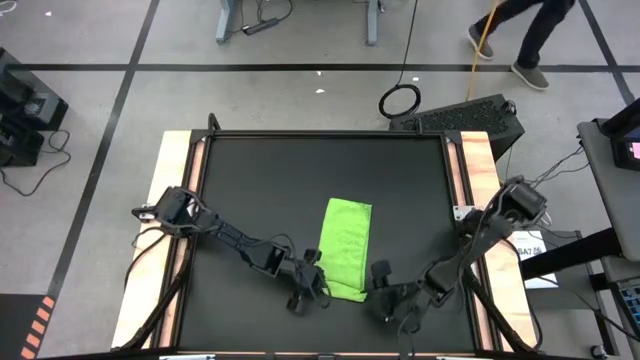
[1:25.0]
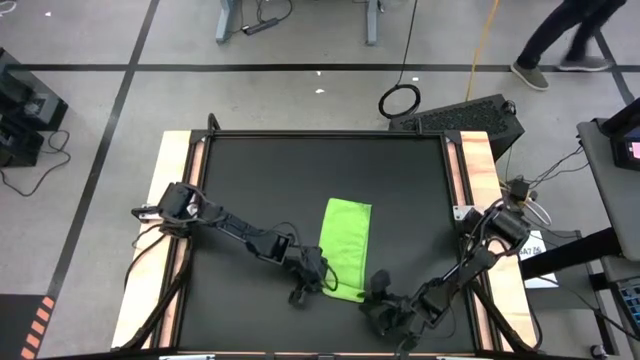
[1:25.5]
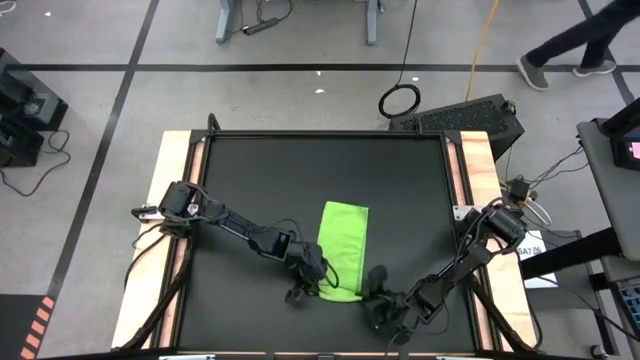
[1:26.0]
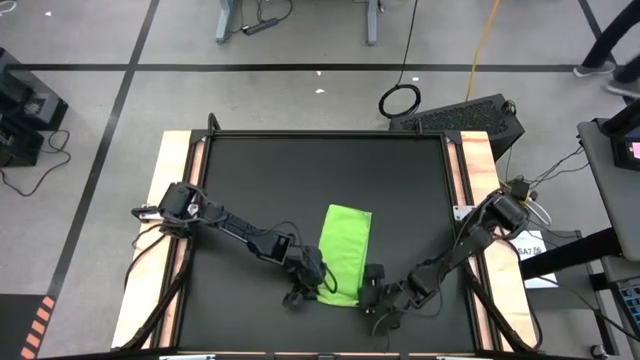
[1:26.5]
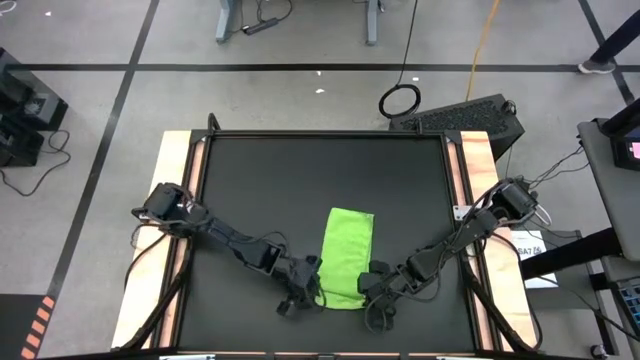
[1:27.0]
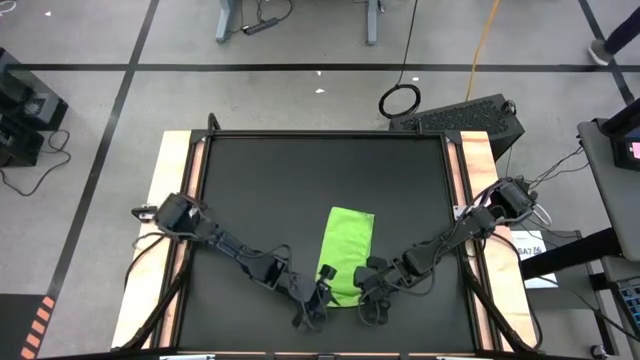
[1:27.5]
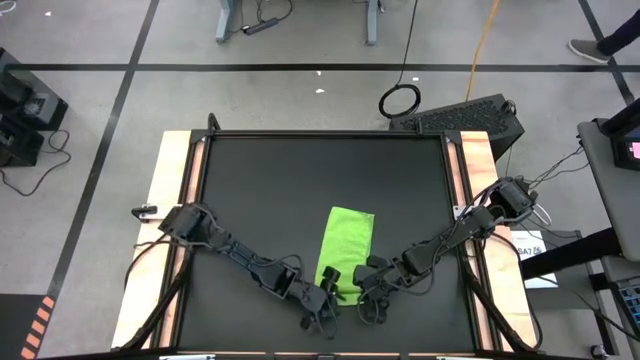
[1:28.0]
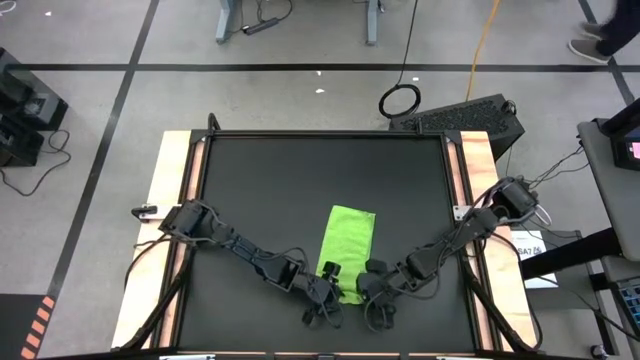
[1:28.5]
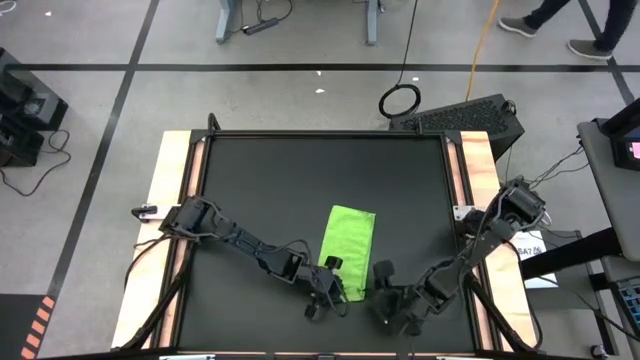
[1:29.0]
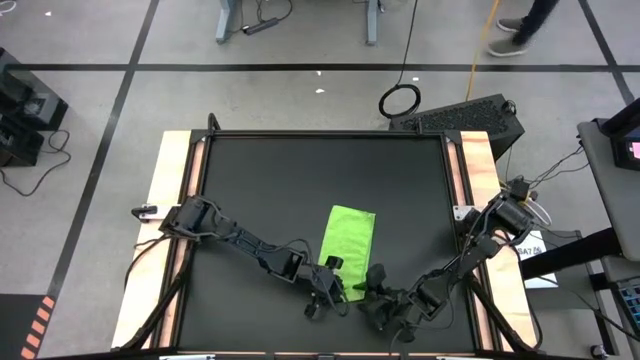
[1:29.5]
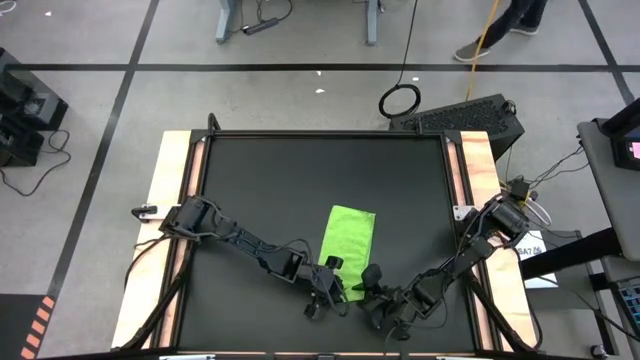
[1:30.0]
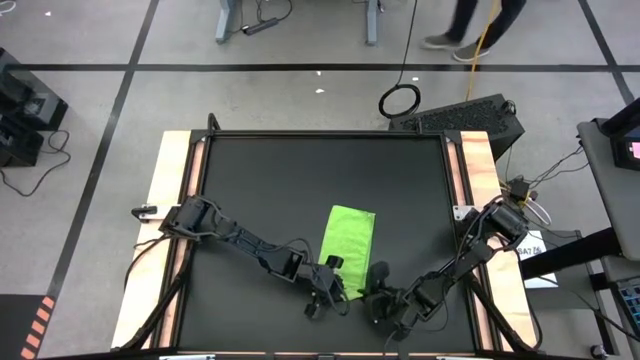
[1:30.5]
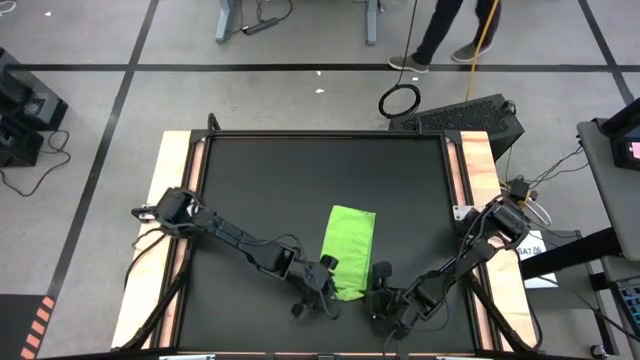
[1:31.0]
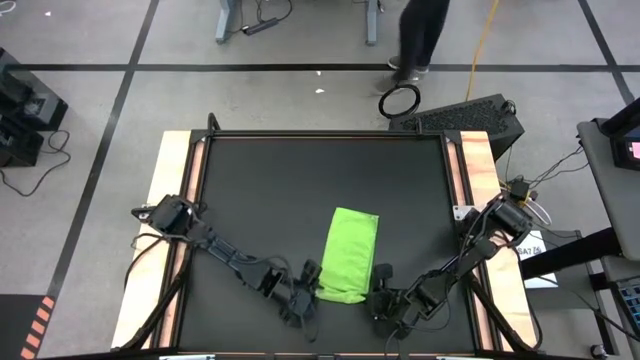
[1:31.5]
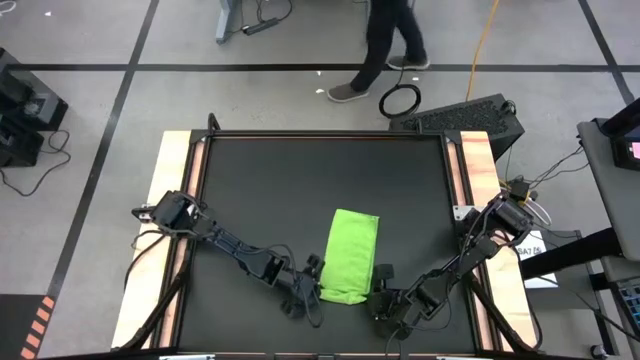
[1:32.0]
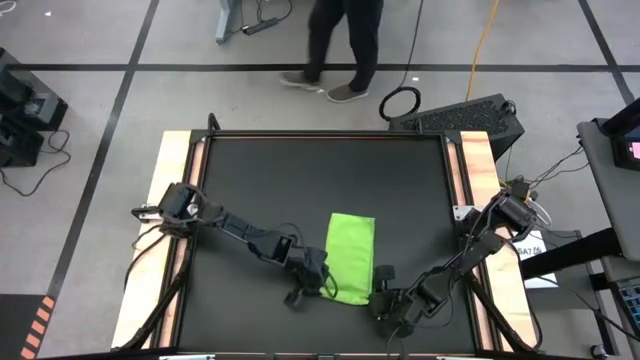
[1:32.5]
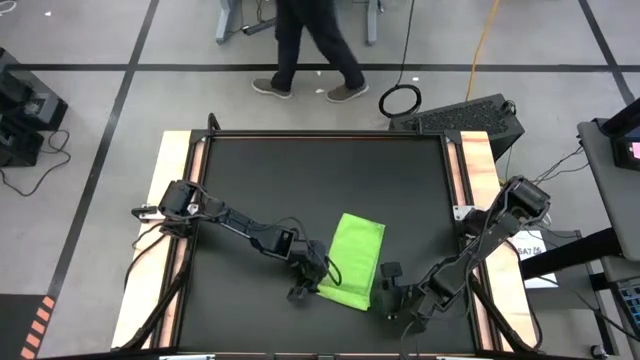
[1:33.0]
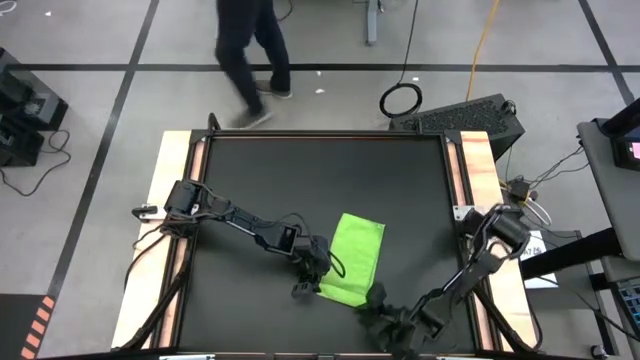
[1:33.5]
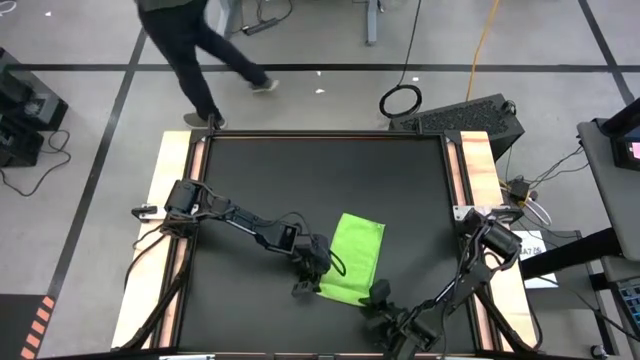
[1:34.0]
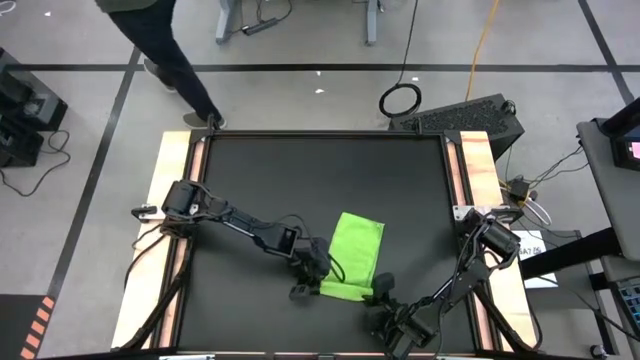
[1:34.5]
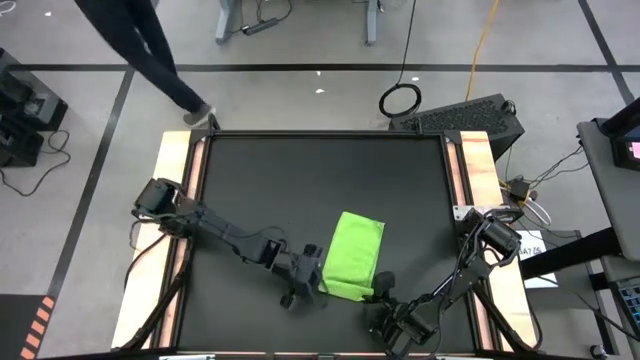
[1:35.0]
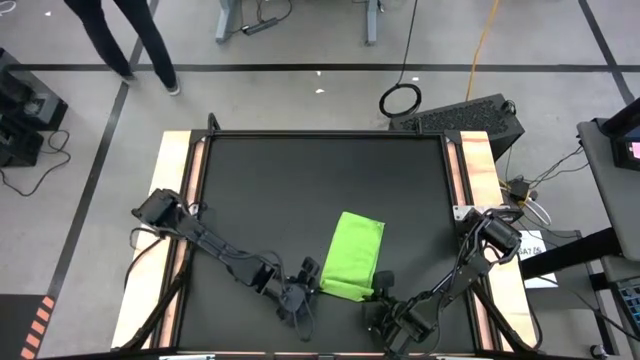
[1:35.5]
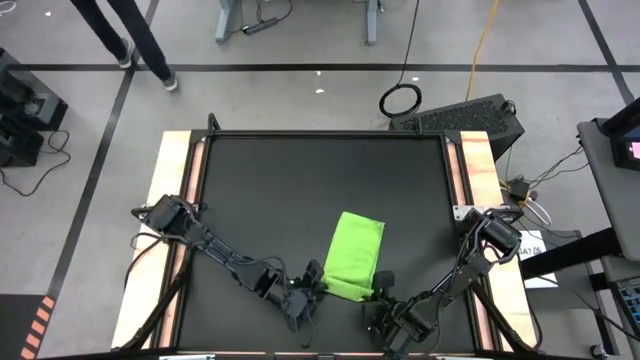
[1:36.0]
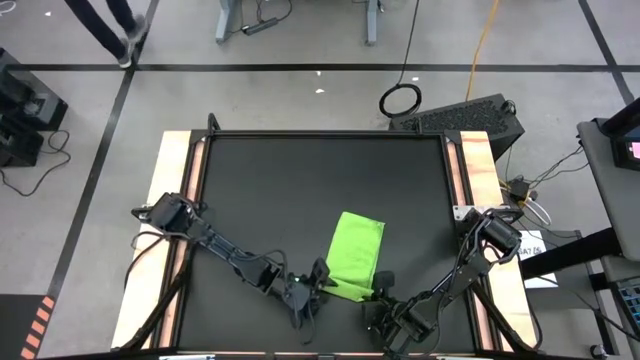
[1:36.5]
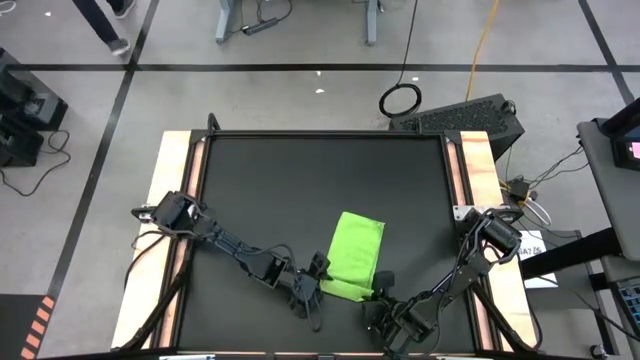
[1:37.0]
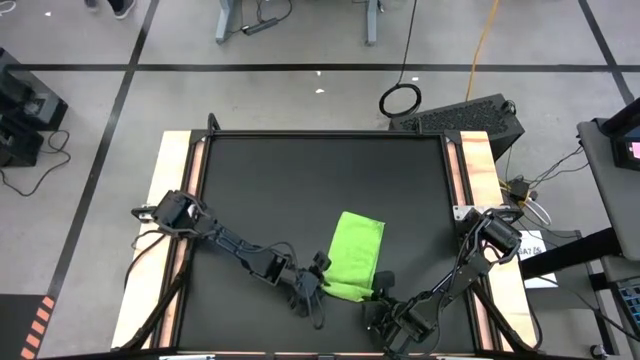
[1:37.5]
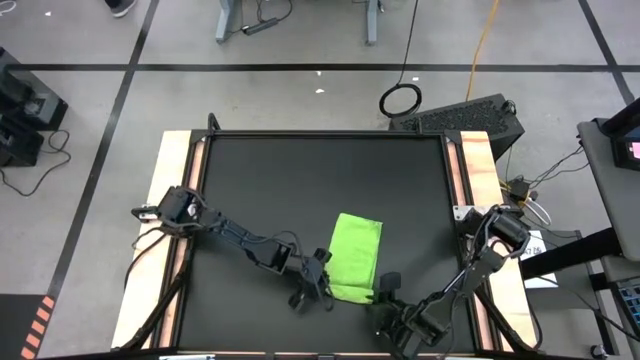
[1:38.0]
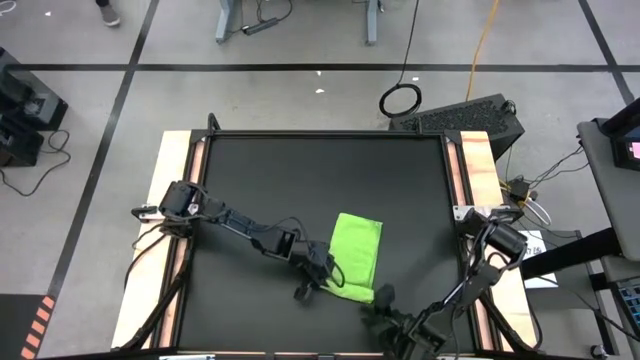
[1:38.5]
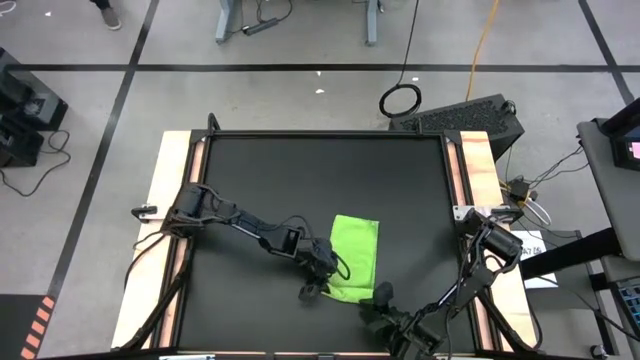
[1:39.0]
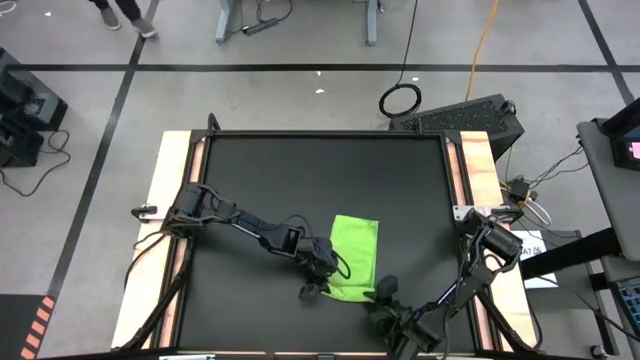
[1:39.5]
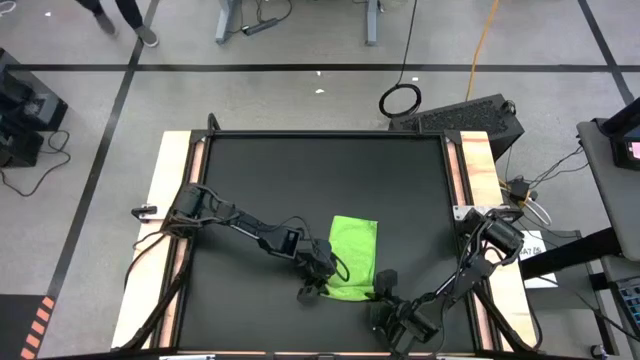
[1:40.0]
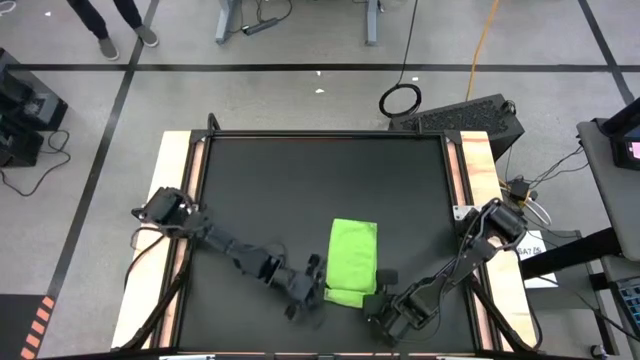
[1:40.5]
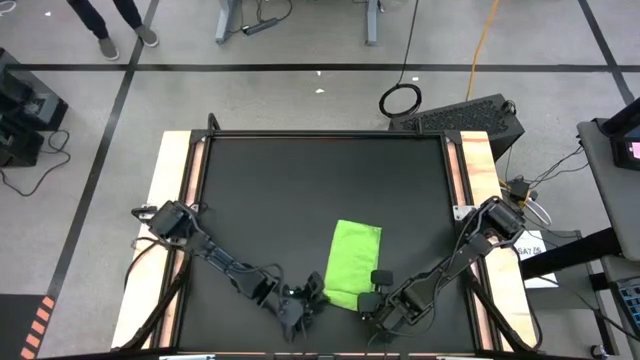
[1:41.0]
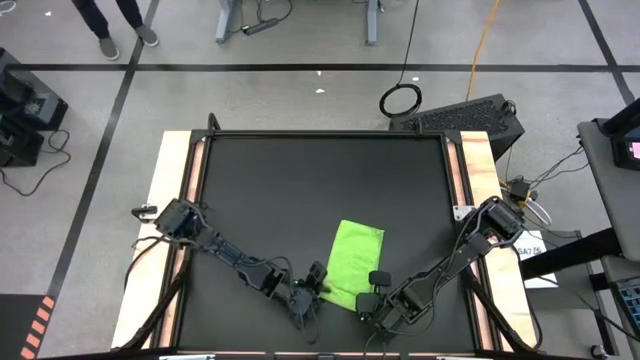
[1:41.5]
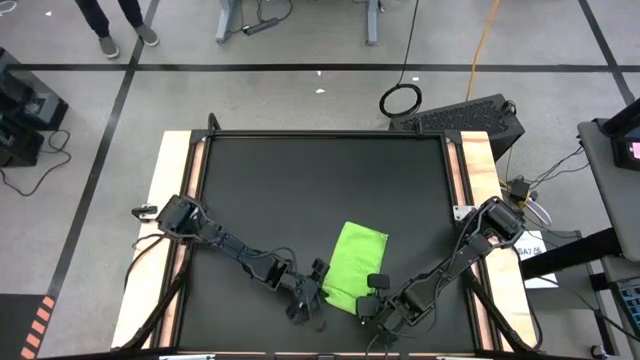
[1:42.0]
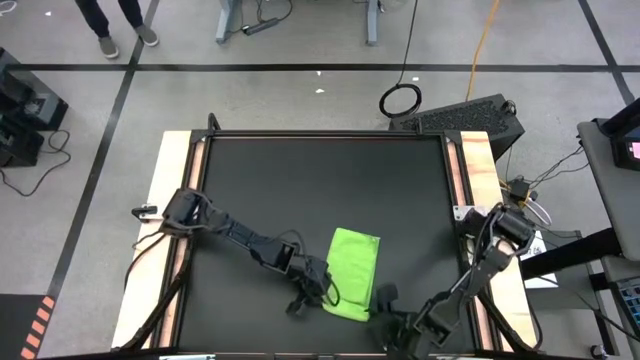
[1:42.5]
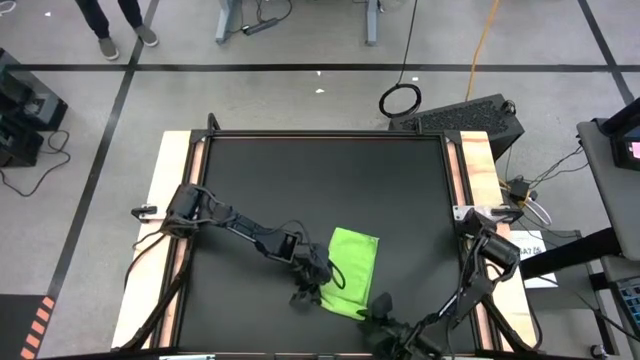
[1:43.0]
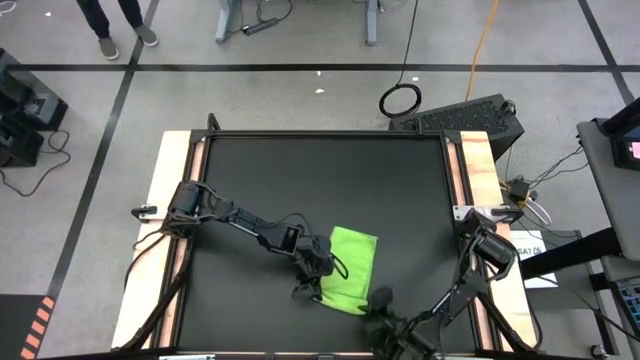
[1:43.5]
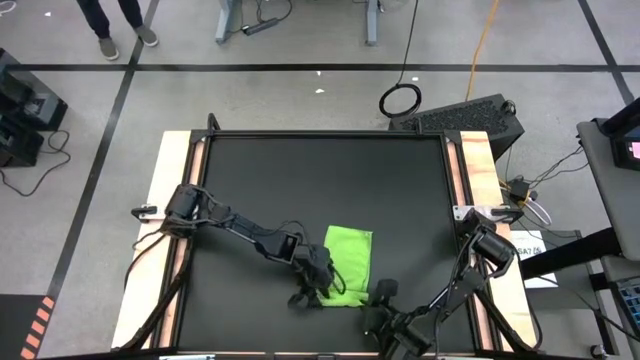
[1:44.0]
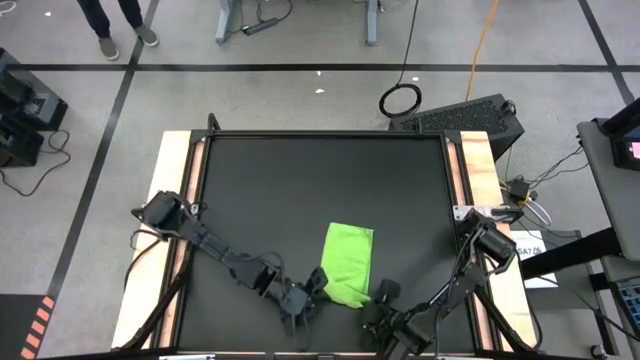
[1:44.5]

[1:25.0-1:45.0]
Task: Roll towel
Roll the green towel on the table

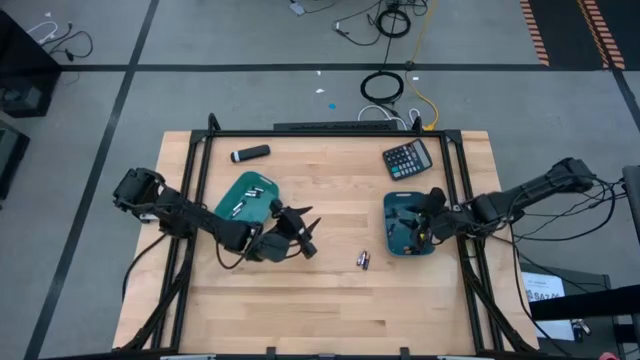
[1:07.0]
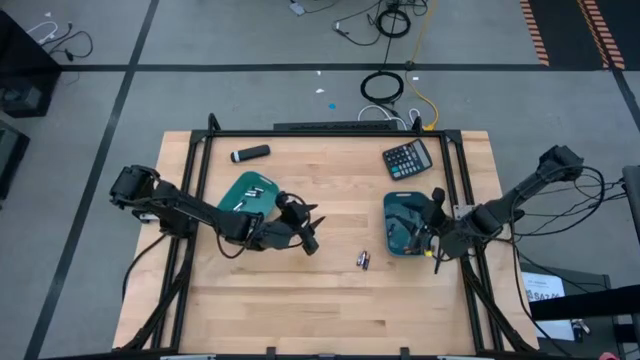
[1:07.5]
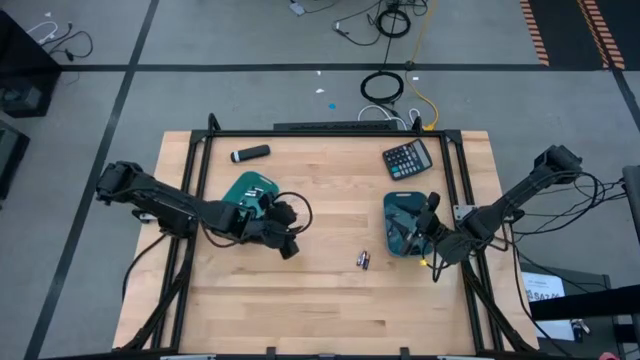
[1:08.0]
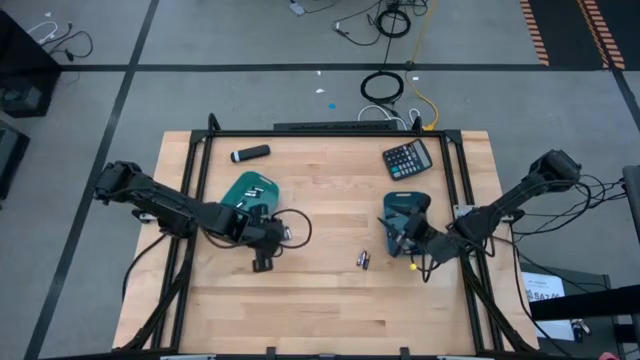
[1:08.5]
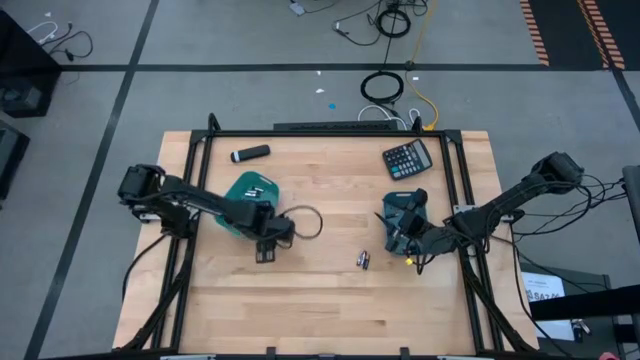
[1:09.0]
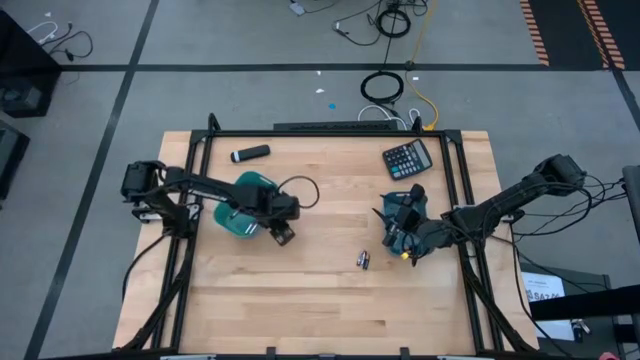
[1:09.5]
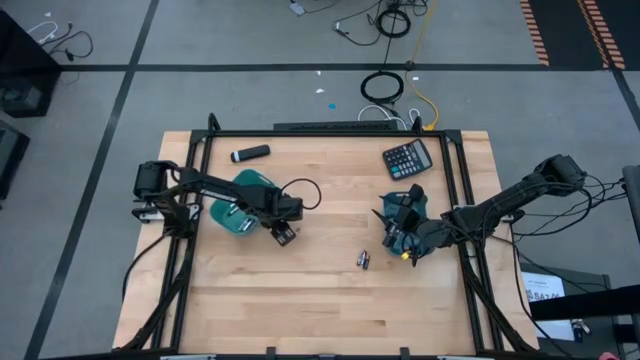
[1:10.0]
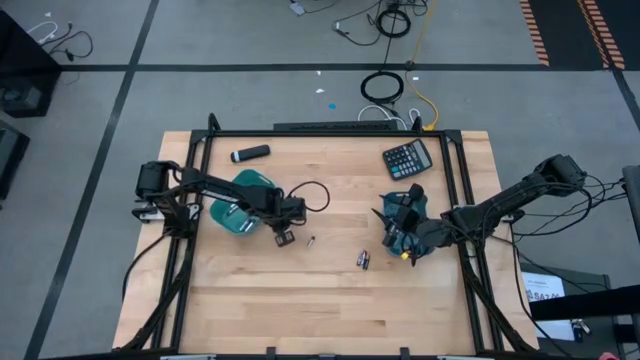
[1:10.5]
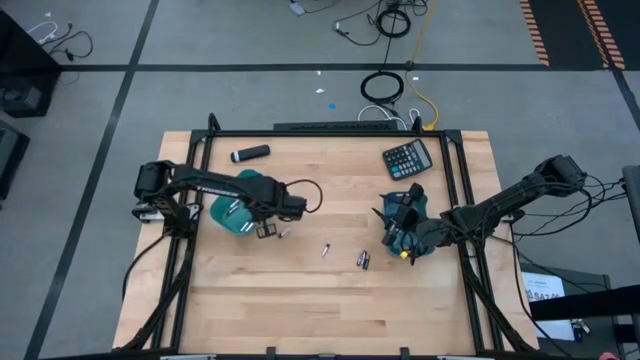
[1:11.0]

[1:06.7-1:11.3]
Task: Sort batteries
Put the silver battery into the green bin
